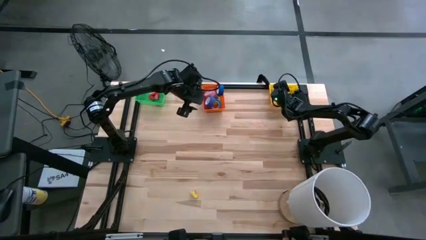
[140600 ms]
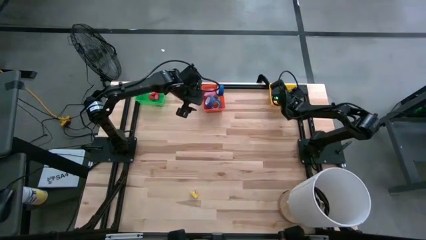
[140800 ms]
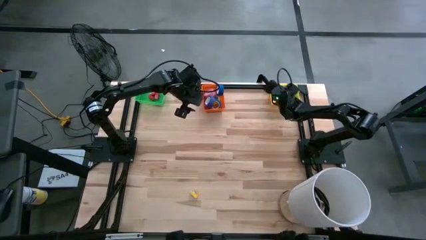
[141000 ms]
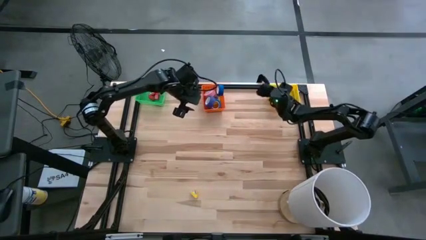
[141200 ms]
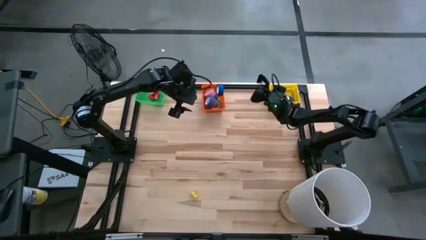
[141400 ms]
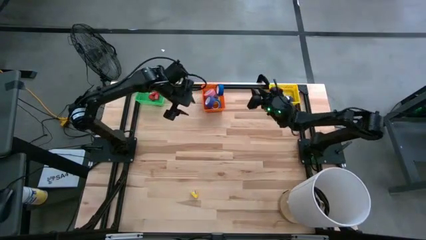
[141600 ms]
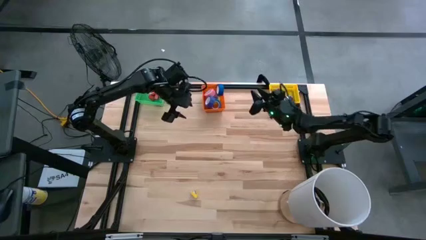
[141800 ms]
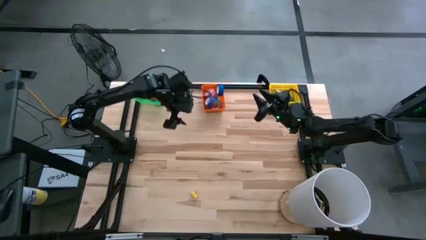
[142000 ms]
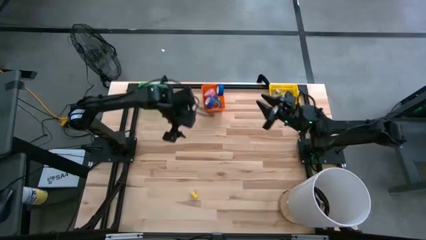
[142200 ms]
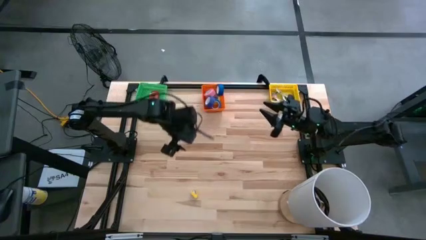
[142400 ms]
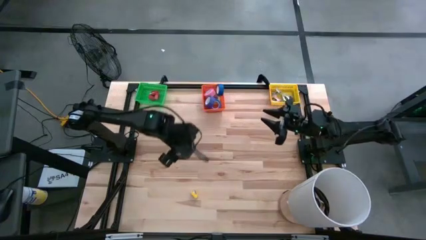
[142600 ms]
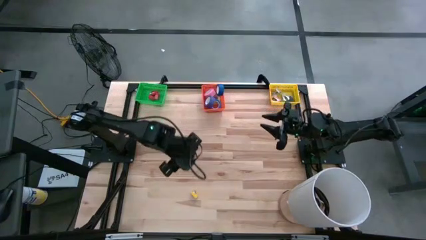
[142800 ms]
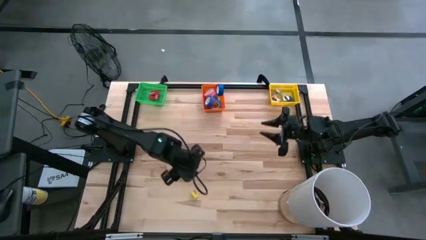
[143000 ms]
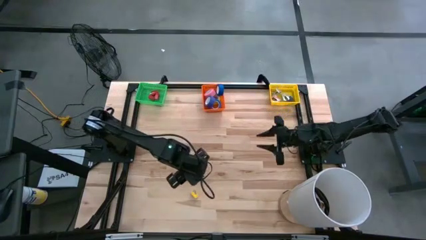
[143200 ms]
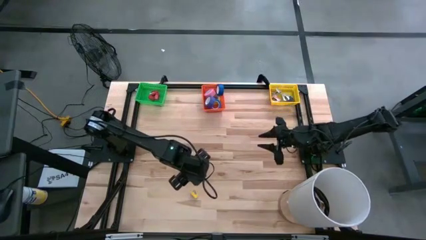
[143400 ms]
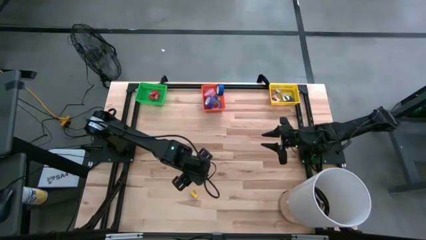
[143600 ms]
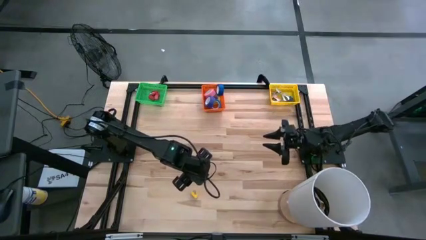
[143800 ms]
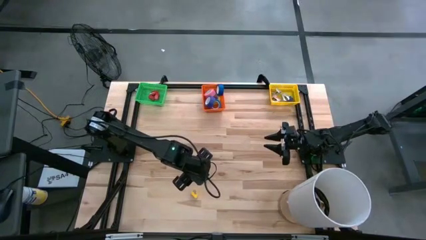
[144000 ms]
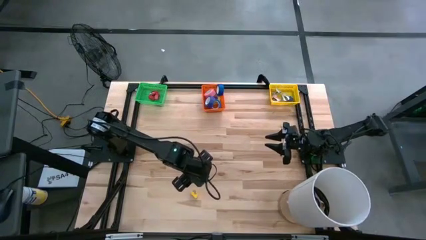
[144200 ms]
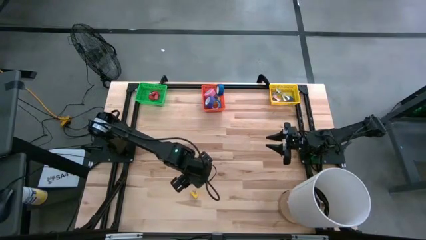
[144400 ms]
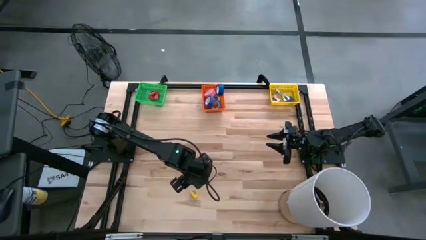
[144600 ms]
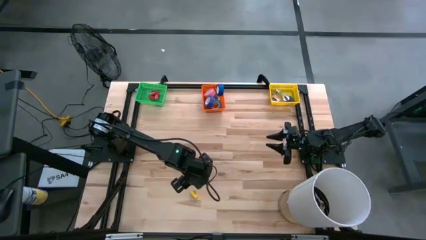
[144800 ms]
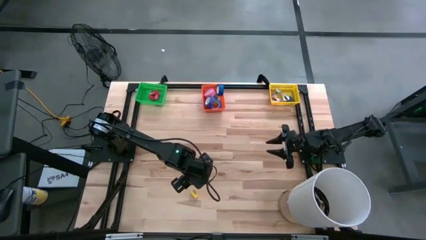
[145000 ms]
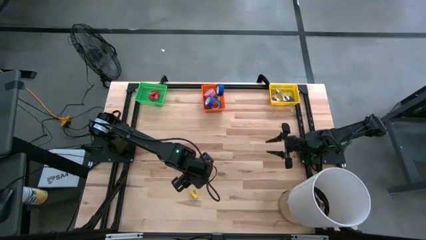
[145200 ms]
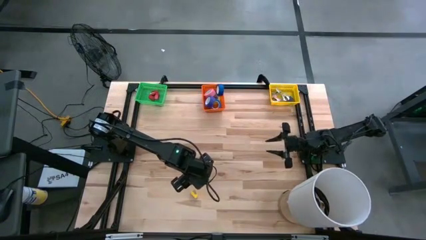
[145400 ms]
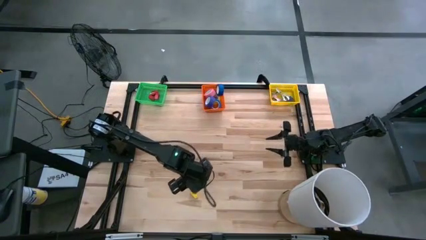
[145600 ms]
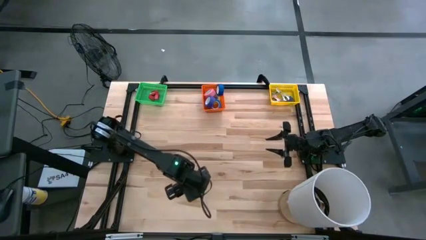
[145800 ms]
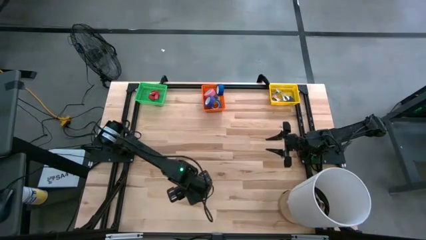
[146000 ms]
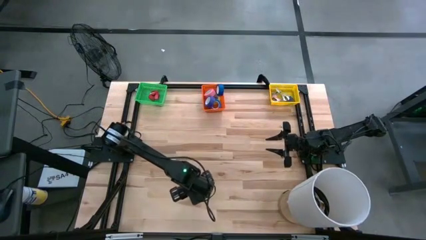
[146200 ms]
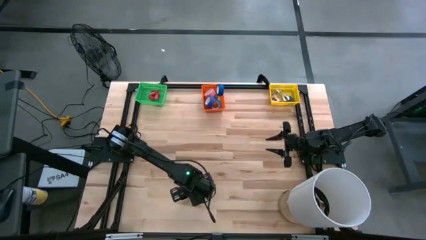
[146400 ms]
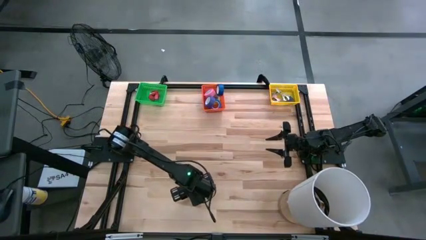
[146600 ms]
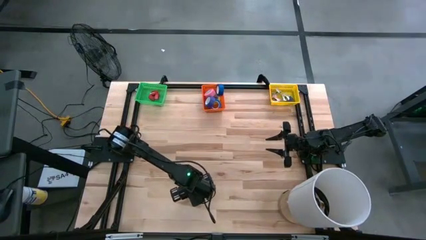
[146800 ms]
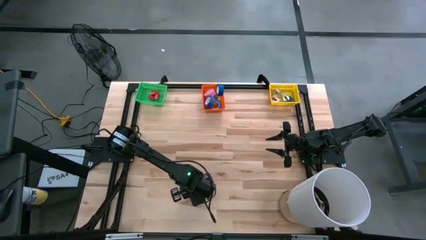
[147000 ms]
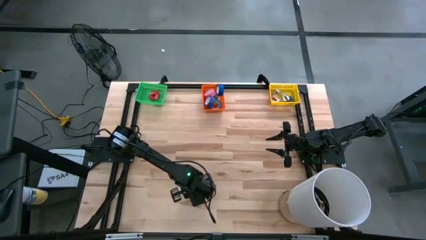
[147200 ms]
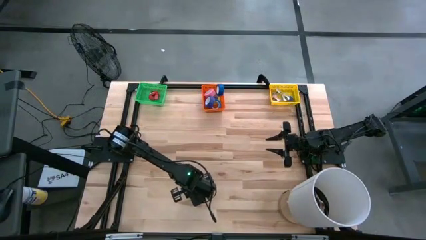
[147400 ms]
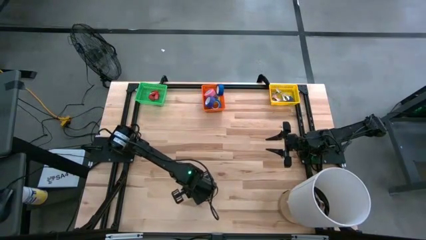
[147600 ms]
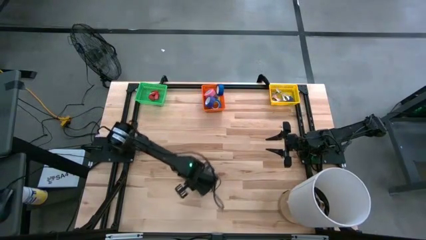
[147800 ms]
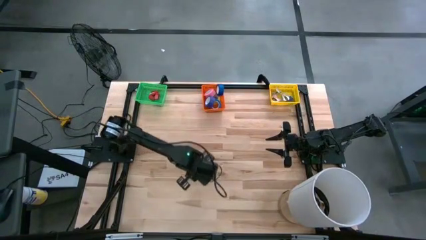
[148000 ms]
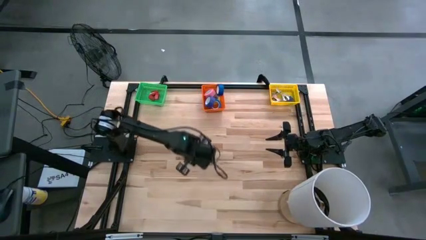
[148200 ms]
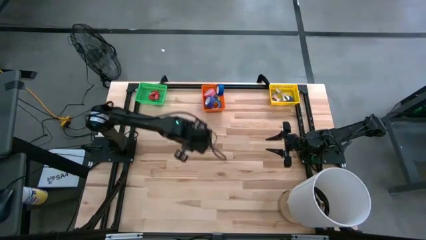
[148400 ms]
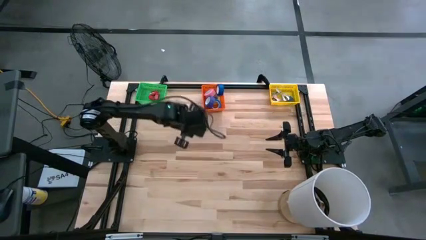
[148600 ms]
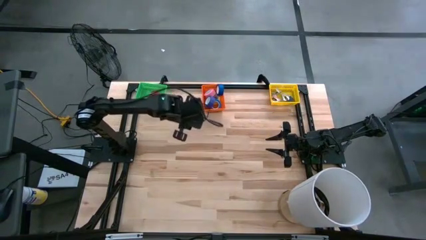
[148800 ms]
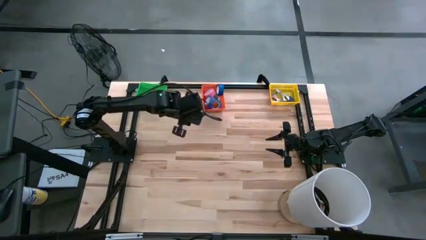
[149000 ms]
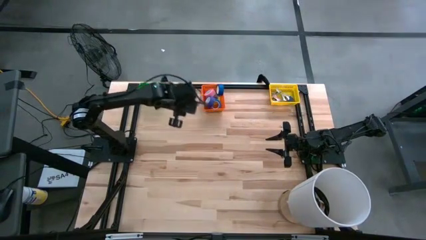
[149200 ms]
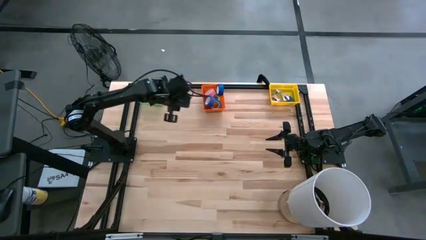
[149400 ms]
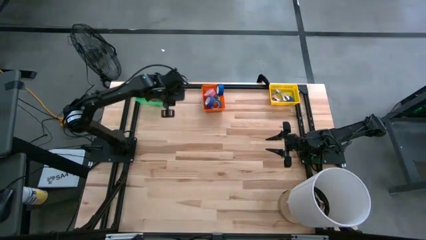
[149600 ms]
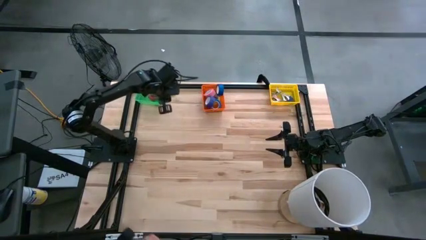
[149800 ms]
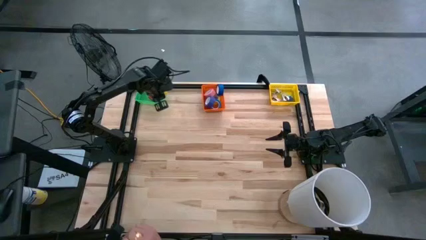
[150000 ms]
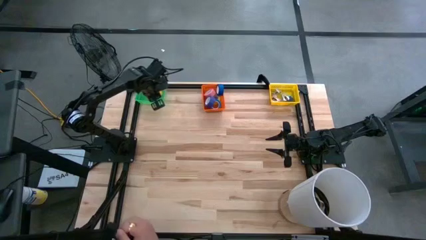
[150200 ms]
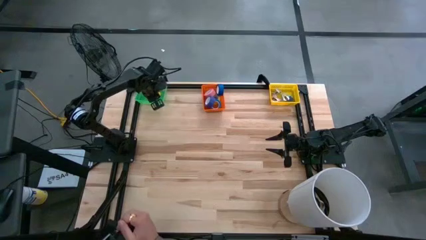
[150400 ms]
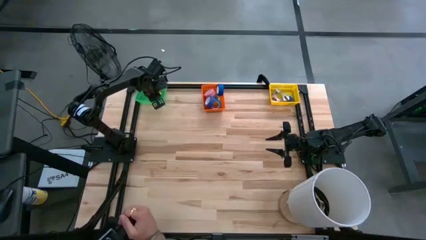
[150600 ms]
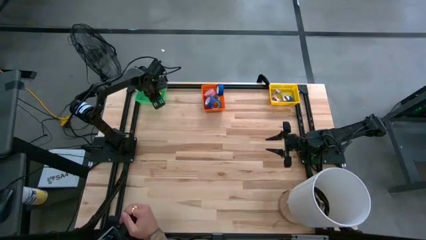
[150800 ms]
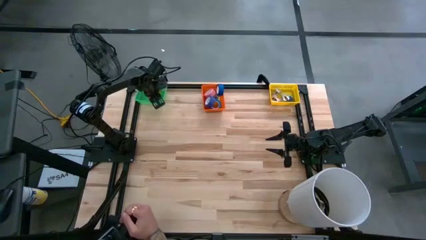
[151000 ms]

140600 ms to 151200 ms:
Task: Pick and place Stapler, Stapler remover, tape
Put the yellow stapler into the green bin

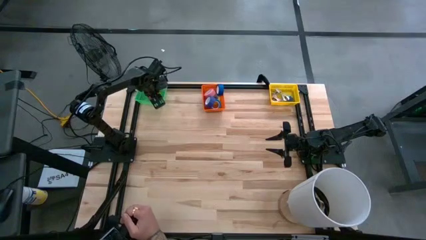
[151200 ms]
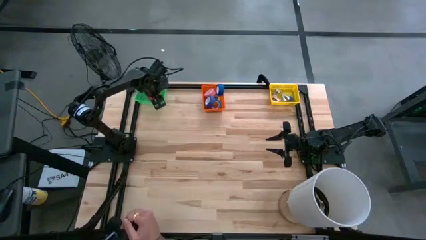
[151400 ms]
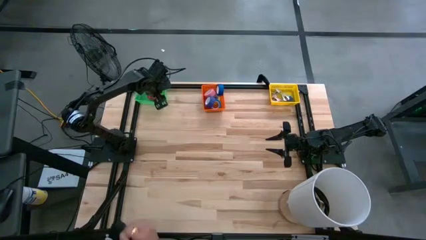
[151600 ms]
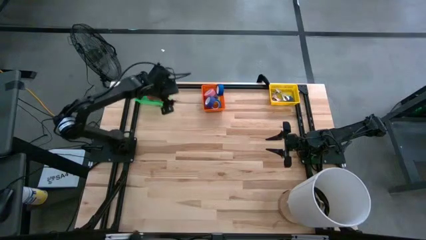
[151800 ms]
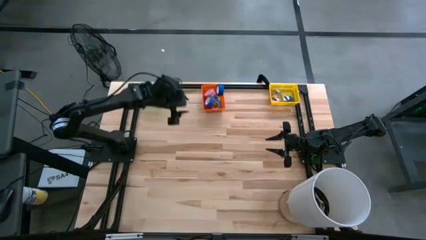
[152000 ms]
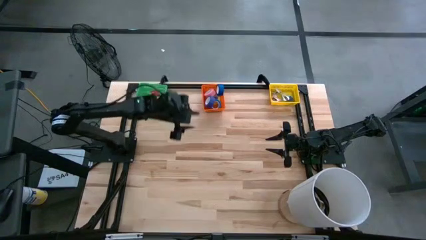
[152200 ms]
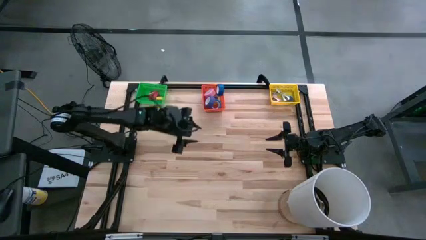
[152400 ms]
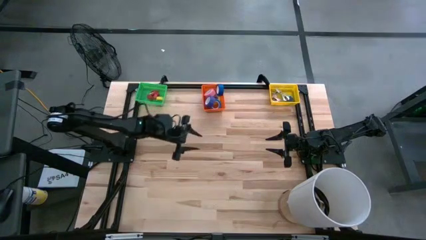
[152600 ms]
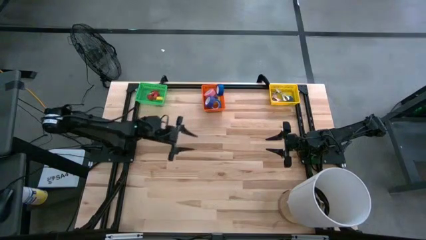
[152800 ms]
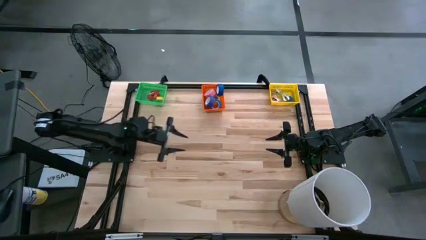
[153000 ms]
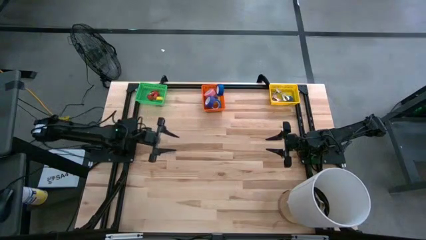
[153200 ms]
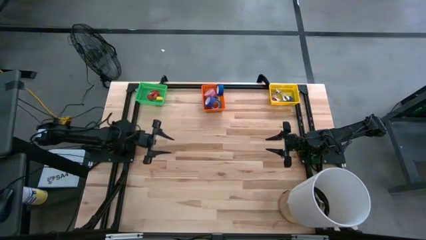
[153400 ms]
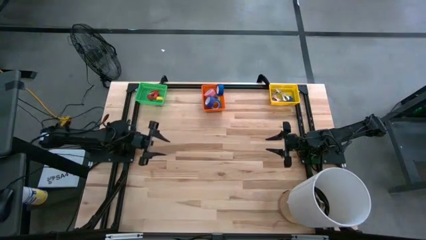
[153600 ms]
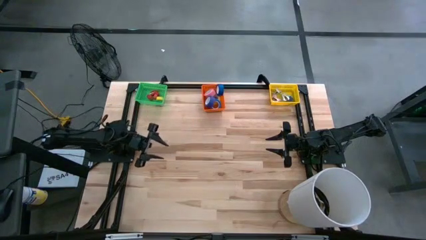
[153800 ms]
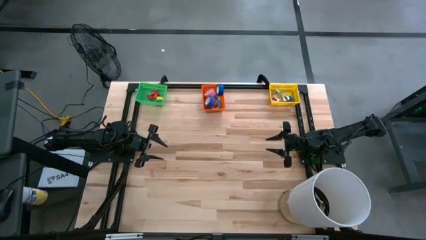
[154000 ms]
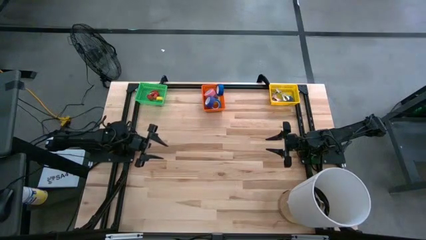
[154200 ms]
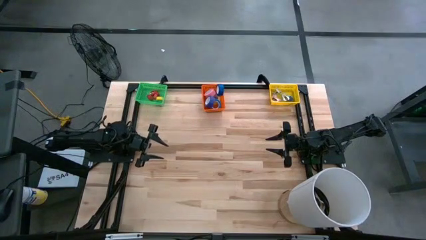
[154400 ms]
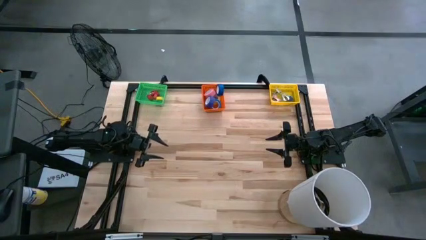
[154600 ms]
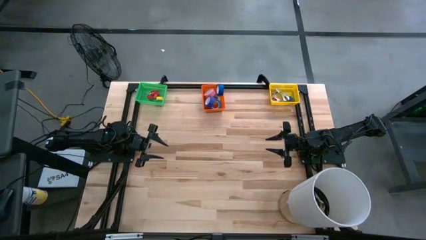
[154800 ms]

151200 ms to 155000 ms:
Return to Home Position
